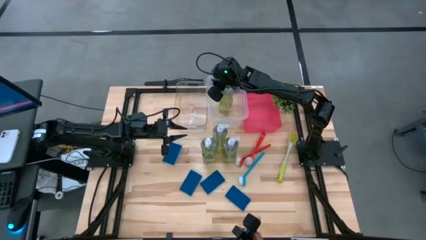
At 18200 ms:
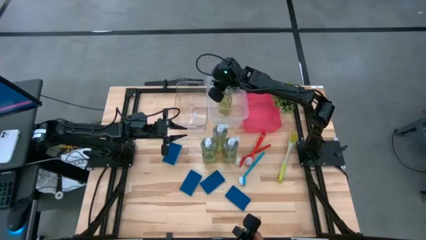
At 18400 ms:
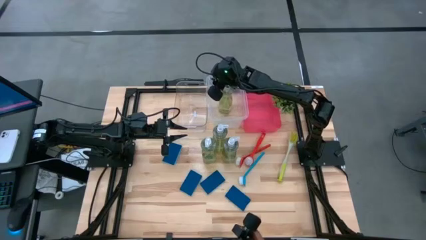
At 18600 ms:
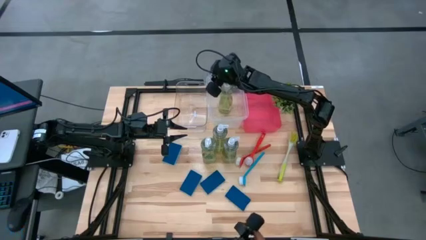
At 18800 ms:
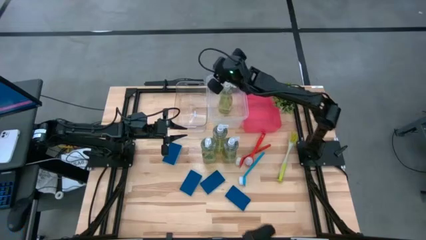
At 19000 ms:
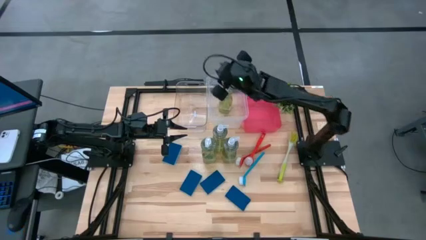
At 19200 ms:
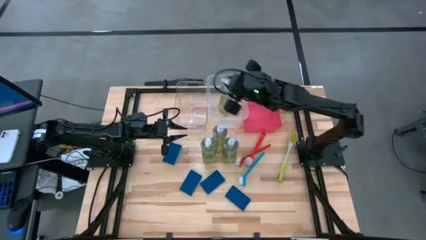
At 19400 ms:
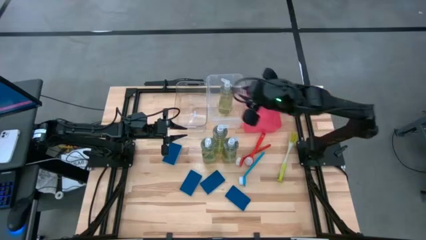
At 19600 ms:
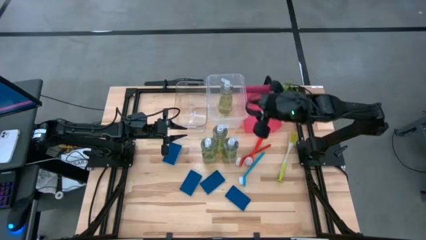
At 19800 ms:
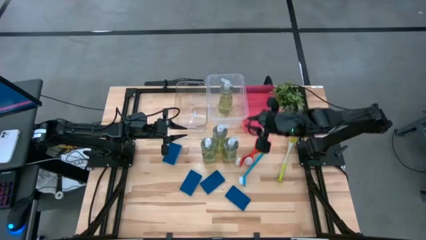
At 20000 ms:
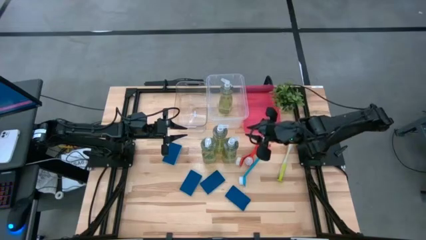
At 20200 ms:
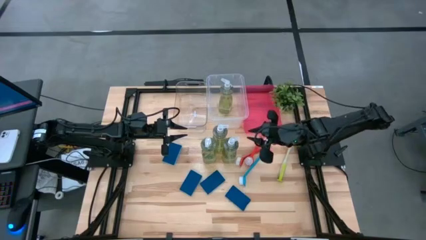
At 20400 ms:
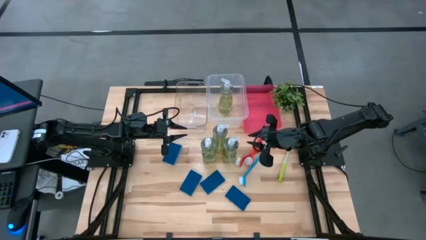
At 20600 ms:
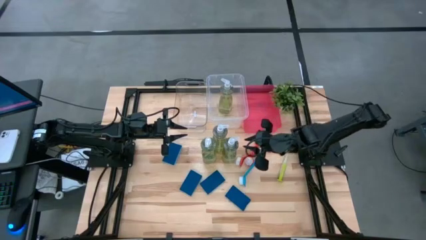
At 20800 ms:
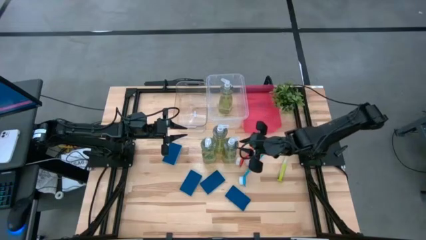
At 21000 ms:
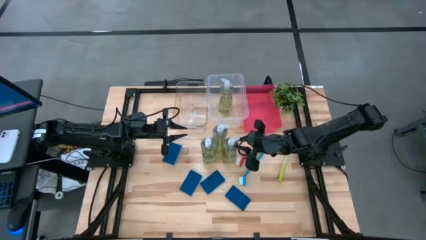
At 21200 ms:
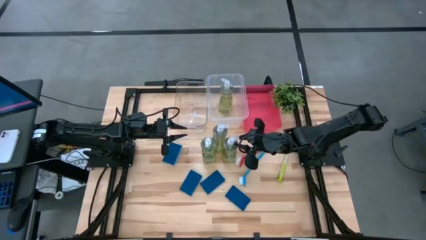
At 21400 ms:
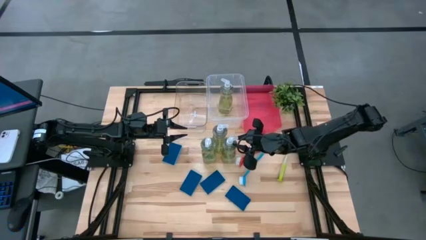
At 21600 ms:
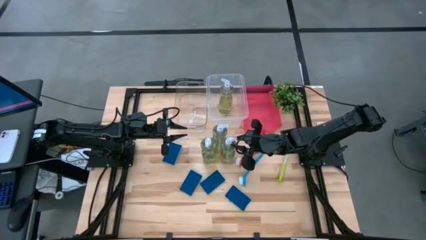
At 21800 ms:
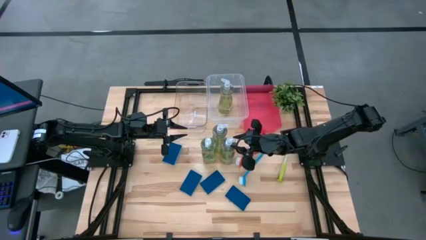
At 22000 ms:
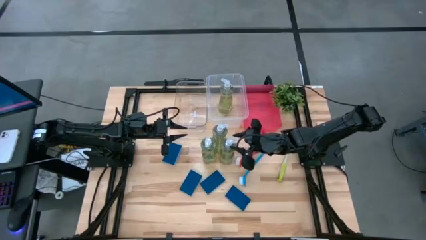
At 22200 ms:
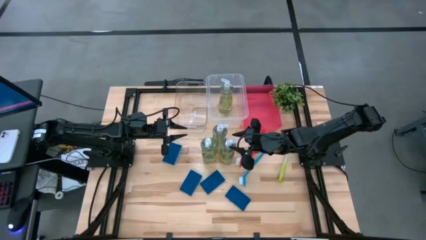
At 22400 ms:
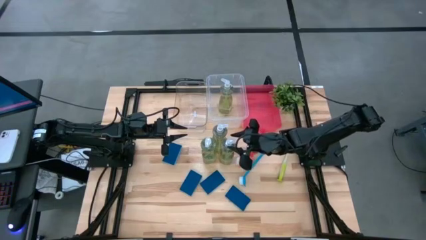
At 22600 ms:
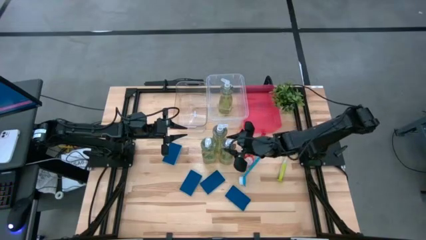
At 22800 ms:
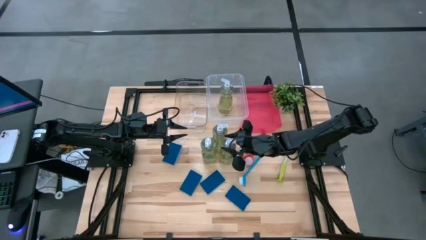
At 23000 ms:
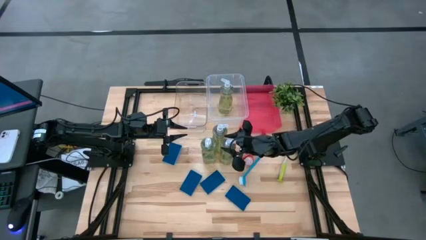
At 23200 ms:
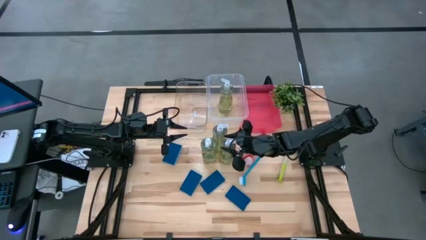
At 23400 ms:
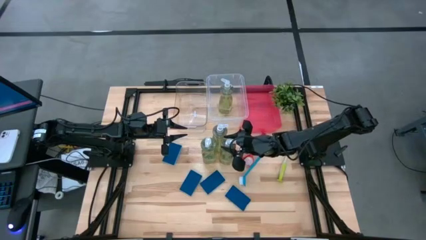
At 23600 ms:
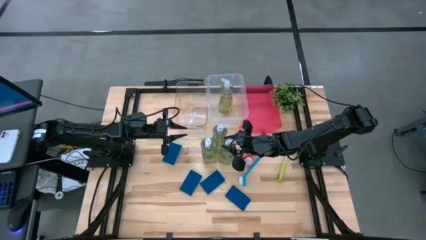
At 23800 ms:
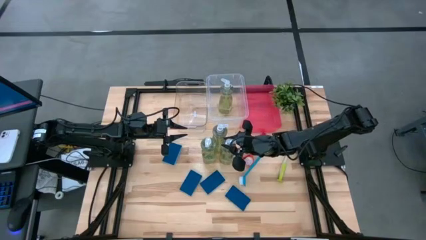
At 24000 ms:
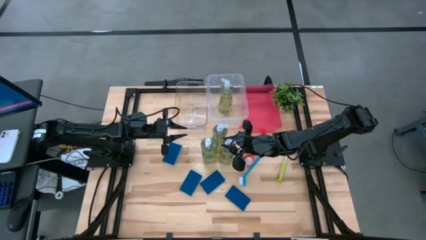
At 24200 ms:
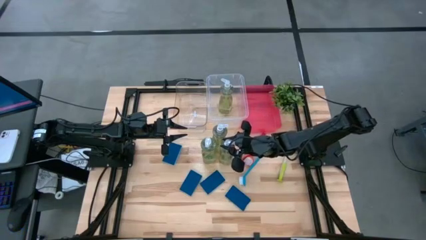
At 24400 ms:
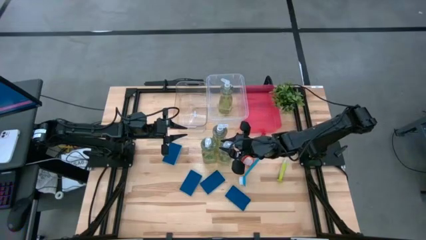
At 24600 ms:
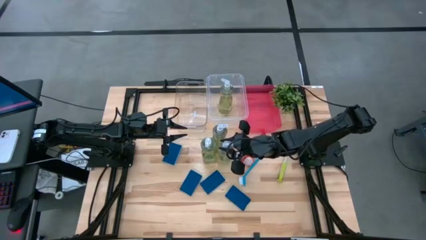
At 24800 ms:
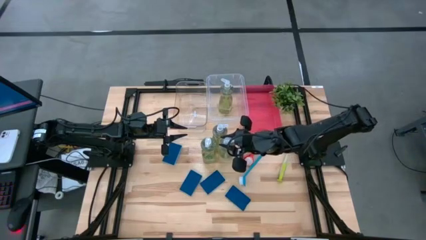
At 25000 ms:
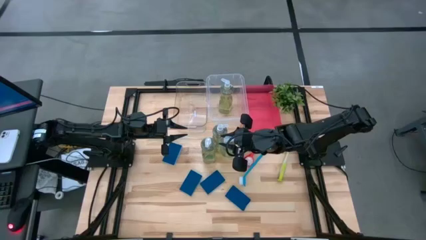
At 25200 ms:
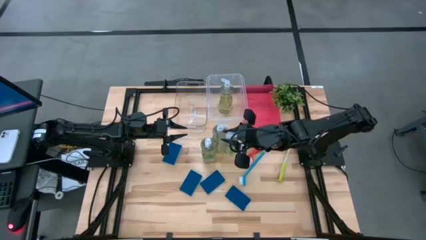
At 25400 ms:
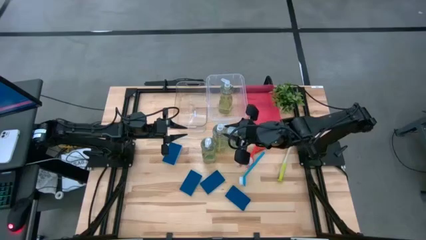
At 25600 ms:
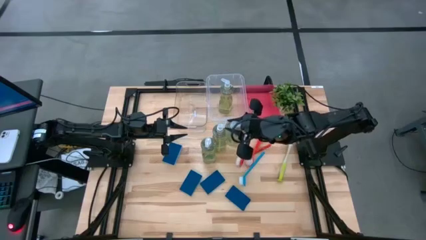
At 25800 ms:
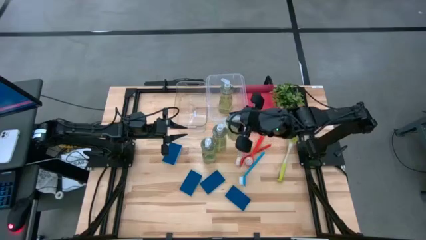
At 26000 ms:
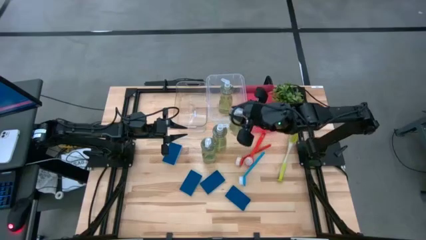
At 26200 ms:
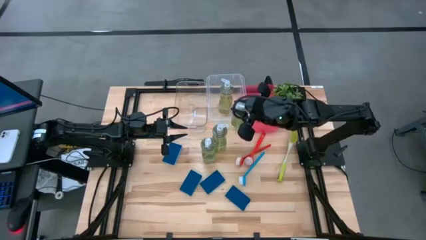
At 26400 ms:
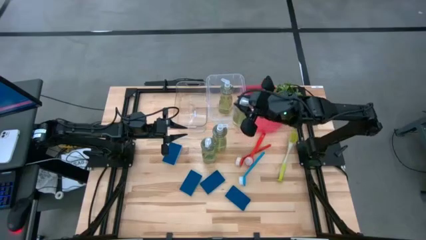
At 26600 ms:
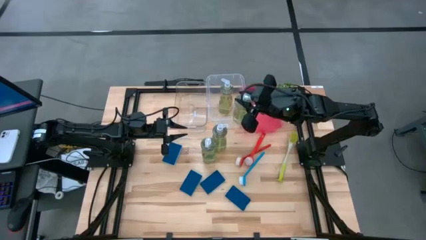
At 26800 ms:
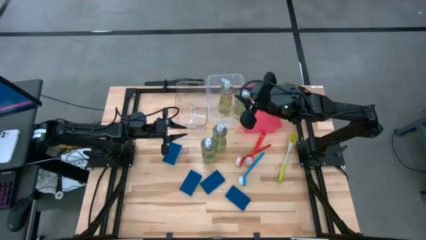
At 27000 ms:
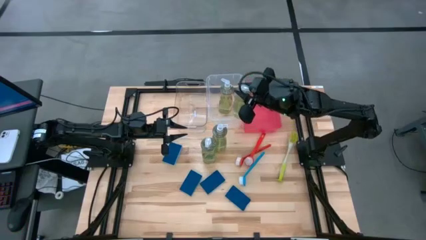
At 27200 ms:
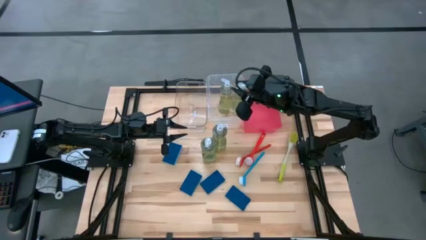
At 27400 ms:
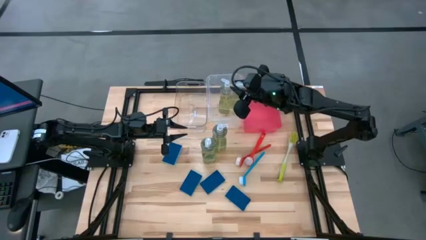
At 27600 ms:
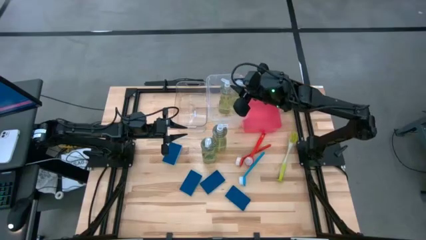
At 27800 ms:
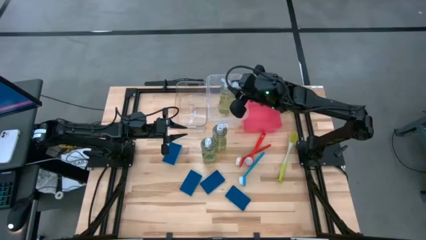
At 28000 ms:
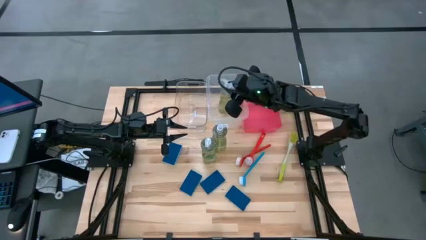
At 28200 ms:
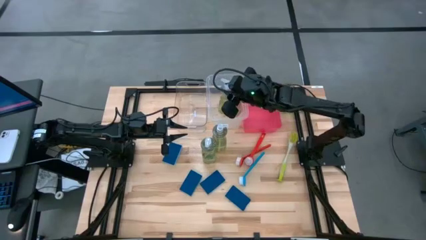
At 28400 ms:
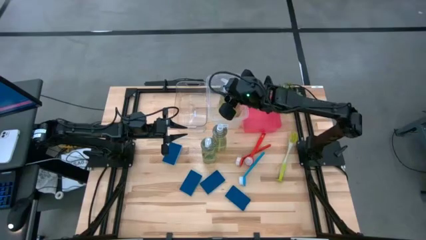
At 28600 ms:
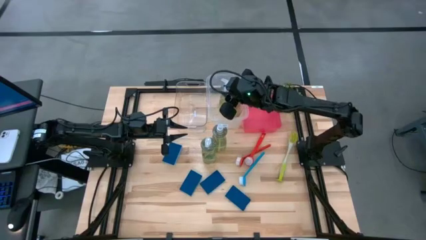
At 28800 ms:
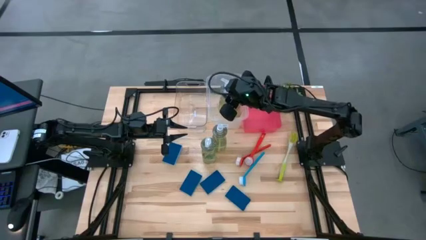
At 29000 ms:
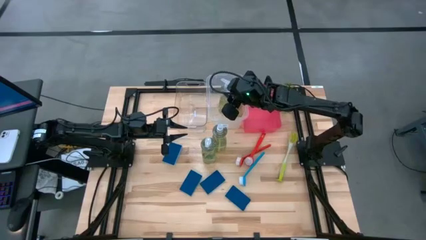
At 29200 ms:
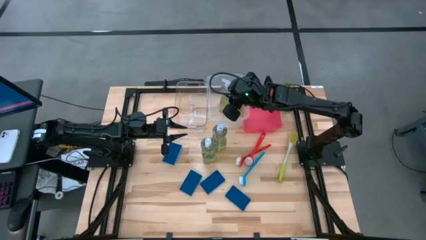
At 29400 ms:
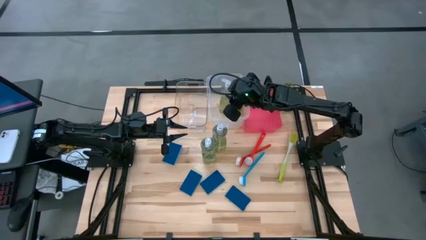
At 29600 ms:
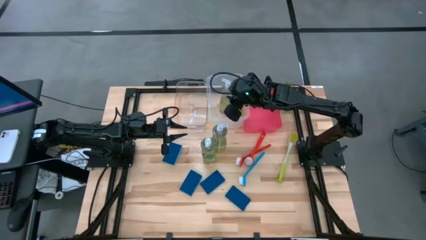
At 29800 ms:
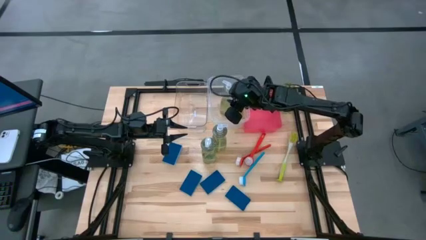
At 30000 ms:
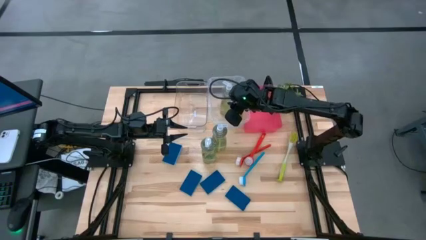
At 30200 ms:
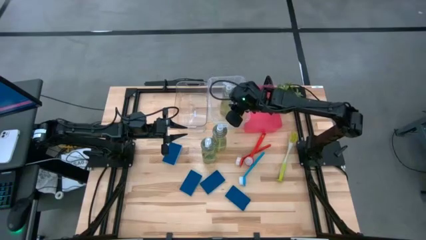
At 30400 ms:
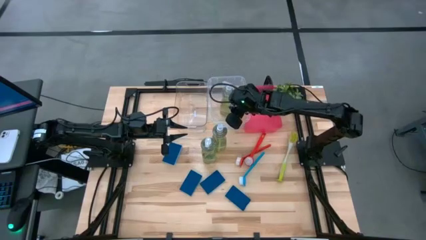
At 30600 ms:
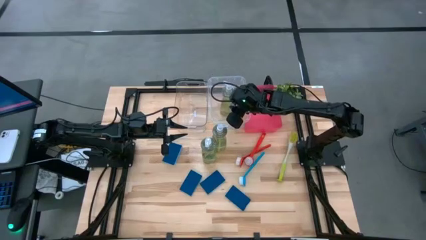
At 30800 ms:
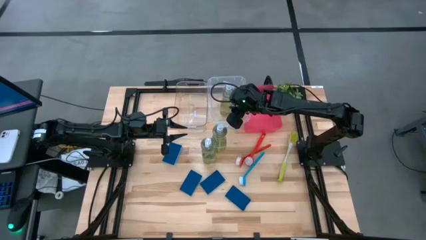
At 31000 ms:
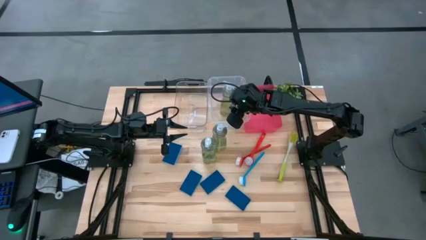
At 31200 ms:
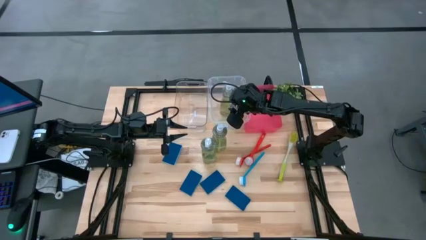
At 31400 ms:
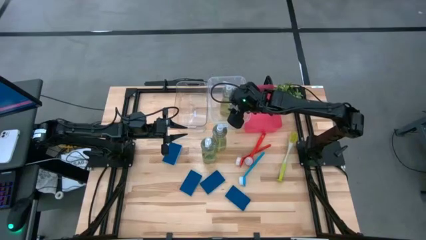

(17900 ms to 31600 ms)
Task: Pick & Place Kitchen Sink Supplies
Put the transparent soap dispenser into the right transparent bin
